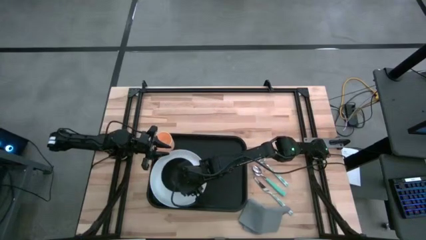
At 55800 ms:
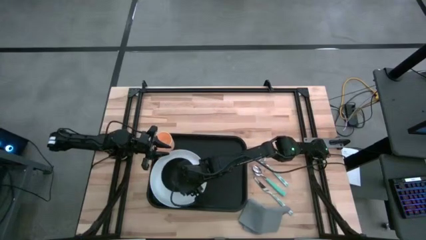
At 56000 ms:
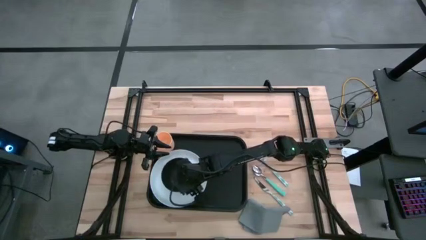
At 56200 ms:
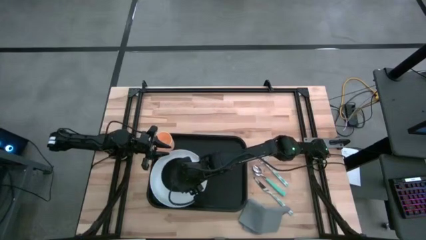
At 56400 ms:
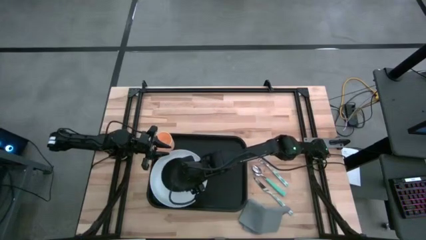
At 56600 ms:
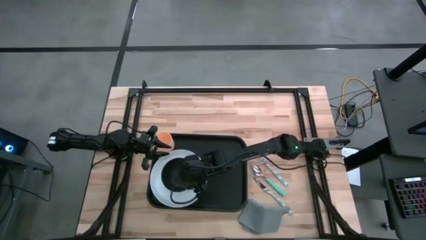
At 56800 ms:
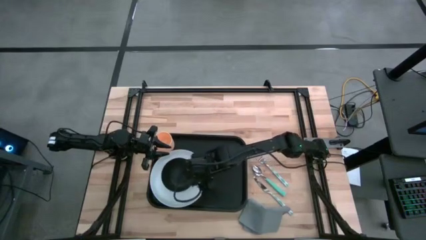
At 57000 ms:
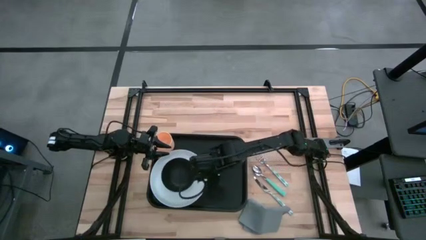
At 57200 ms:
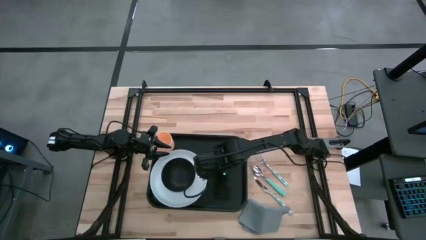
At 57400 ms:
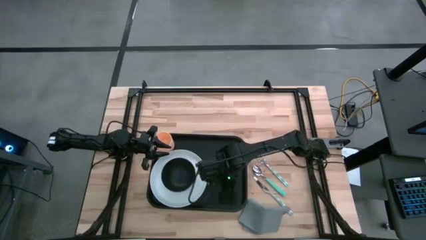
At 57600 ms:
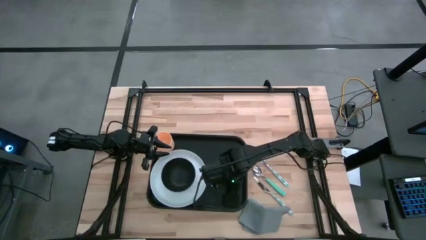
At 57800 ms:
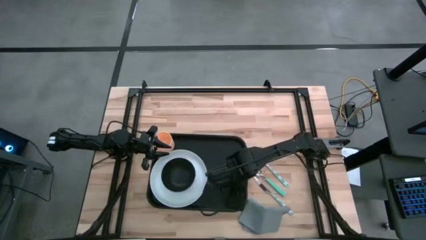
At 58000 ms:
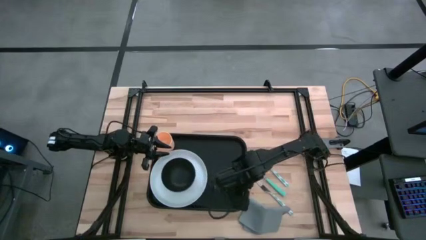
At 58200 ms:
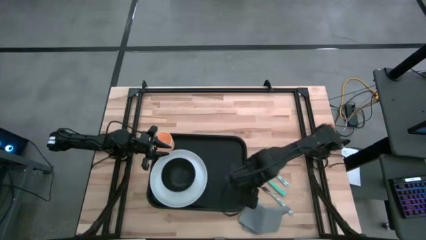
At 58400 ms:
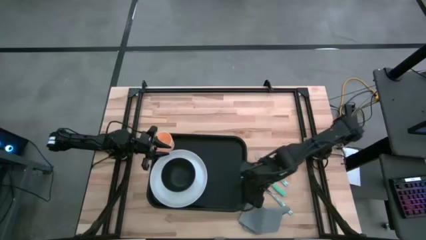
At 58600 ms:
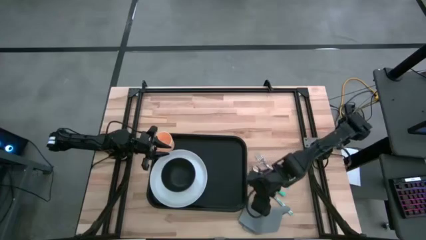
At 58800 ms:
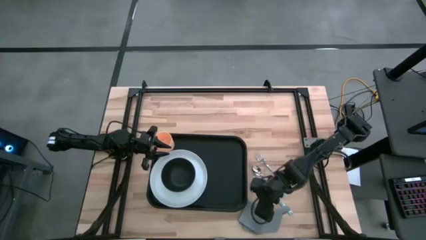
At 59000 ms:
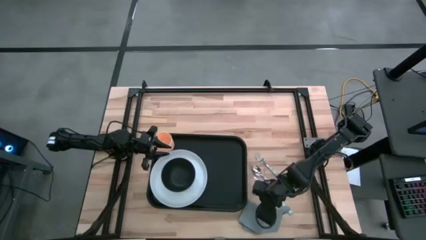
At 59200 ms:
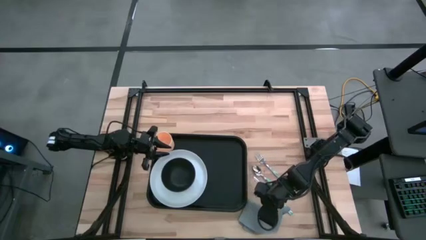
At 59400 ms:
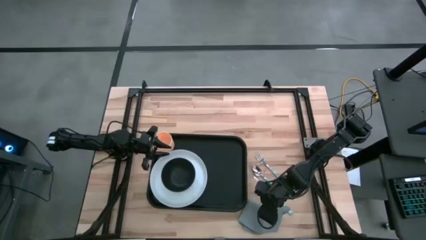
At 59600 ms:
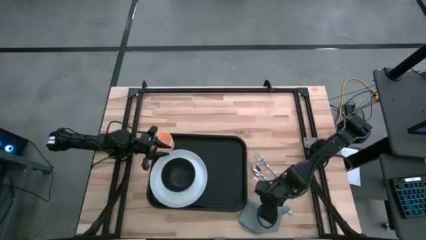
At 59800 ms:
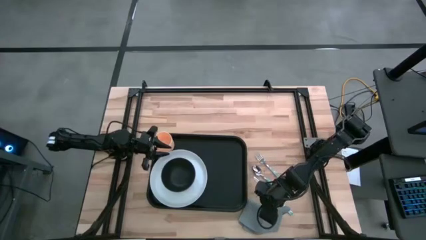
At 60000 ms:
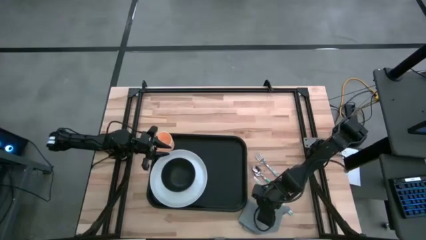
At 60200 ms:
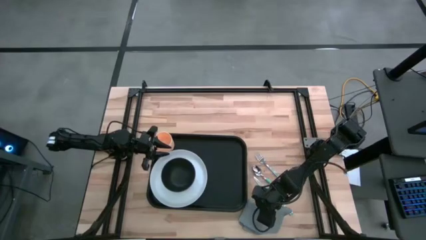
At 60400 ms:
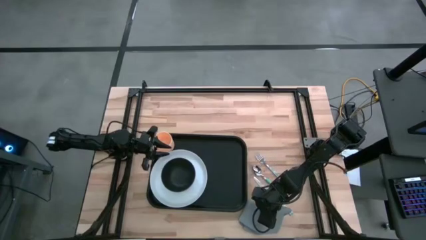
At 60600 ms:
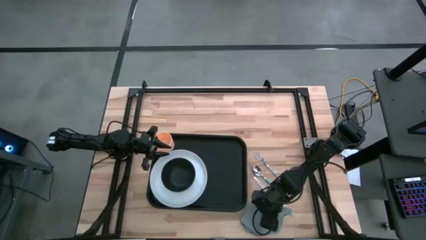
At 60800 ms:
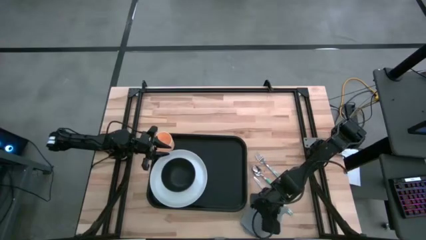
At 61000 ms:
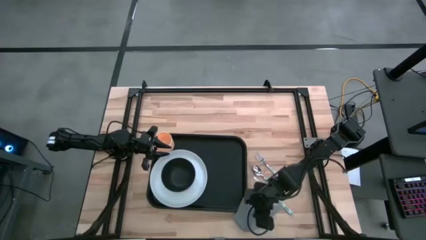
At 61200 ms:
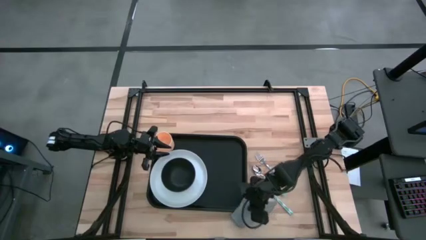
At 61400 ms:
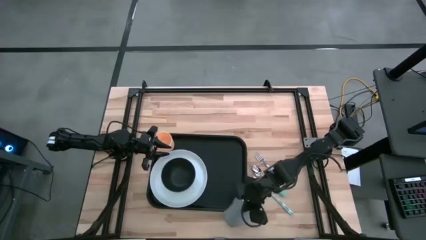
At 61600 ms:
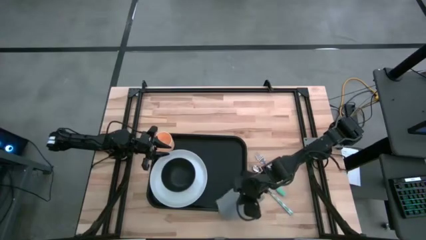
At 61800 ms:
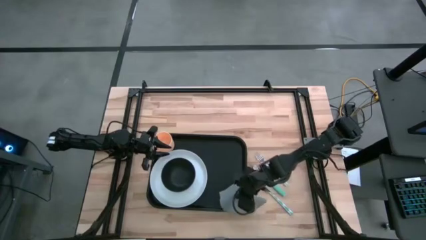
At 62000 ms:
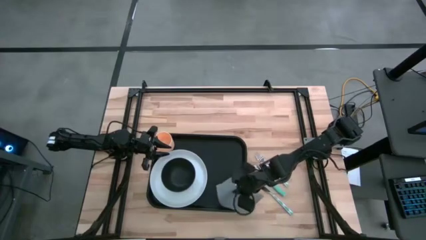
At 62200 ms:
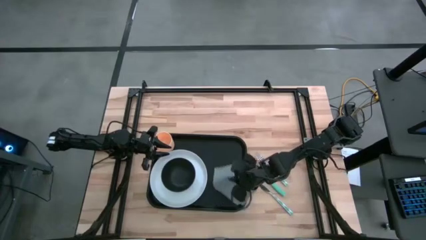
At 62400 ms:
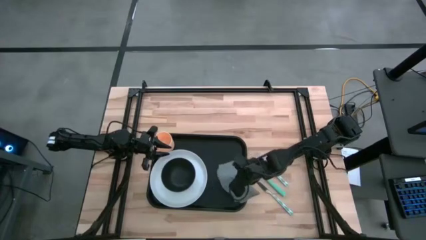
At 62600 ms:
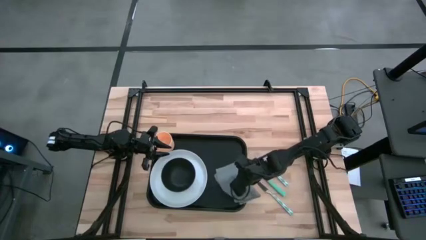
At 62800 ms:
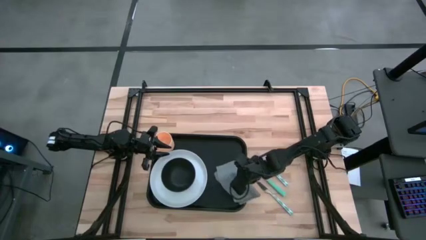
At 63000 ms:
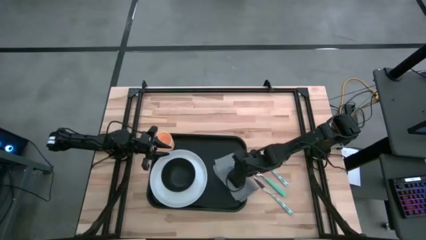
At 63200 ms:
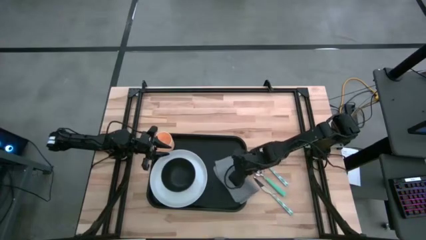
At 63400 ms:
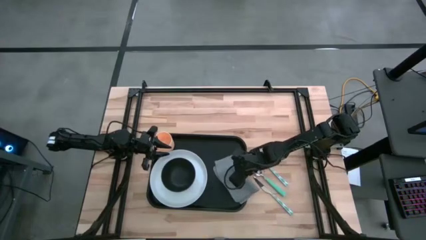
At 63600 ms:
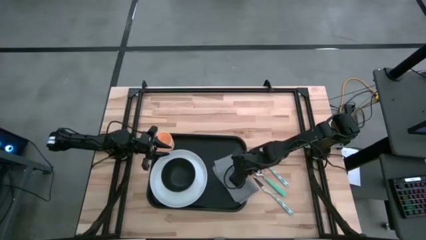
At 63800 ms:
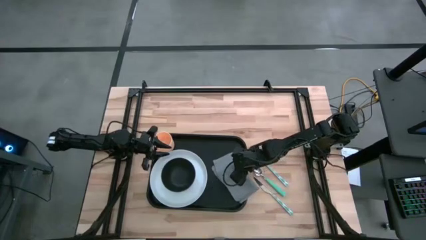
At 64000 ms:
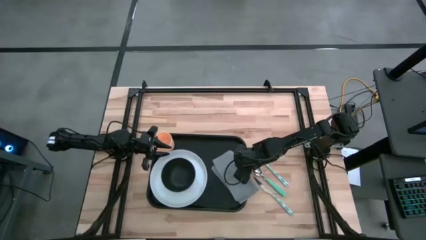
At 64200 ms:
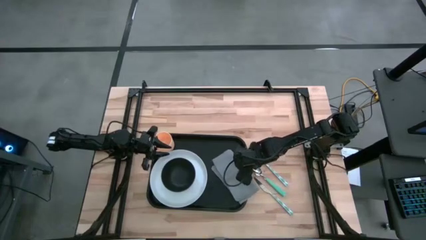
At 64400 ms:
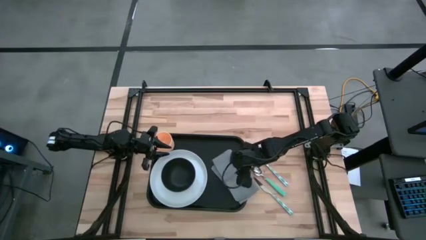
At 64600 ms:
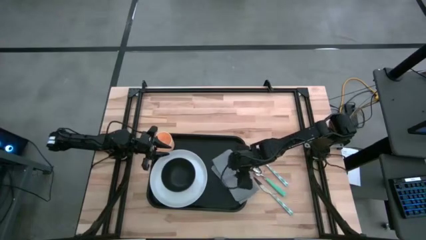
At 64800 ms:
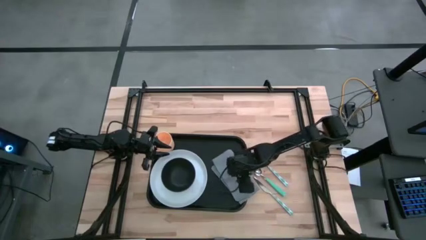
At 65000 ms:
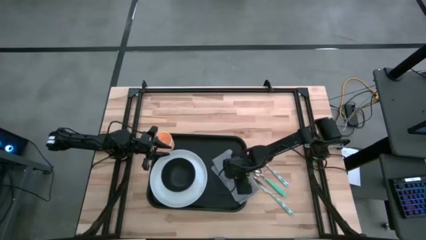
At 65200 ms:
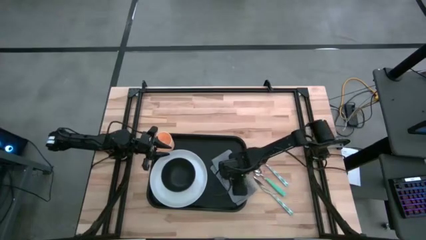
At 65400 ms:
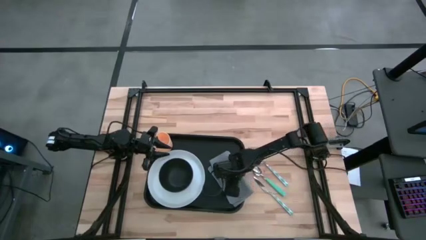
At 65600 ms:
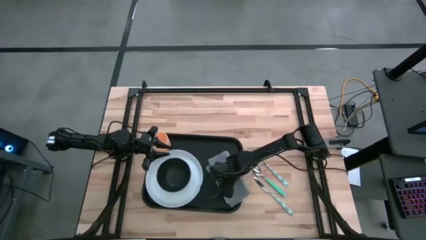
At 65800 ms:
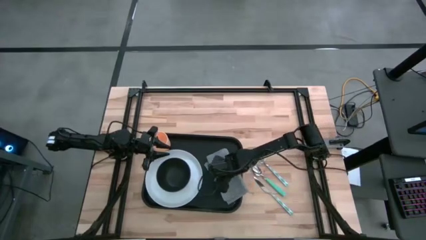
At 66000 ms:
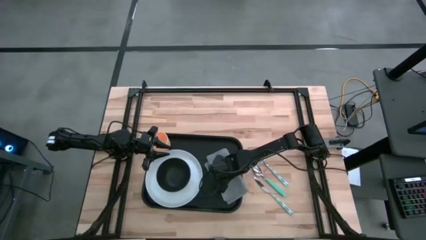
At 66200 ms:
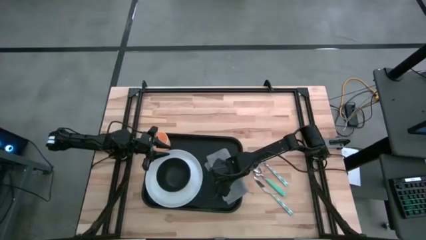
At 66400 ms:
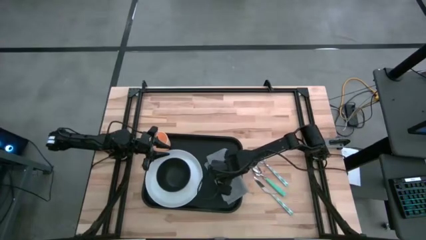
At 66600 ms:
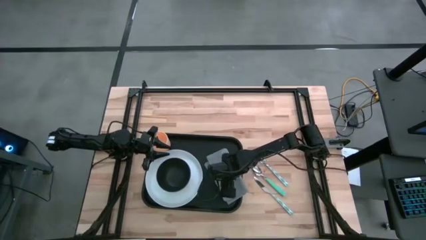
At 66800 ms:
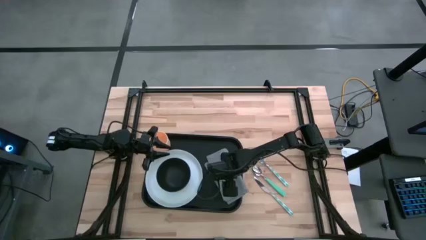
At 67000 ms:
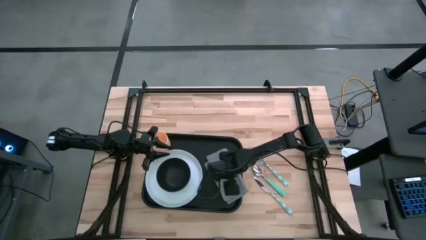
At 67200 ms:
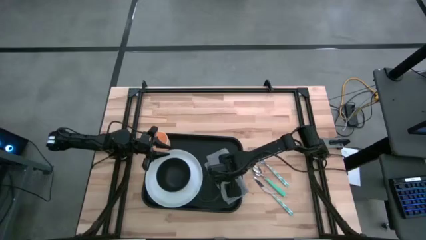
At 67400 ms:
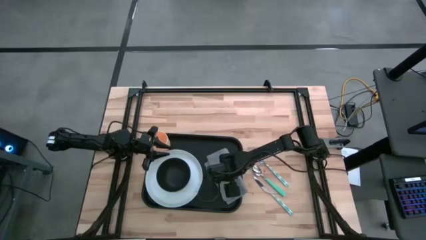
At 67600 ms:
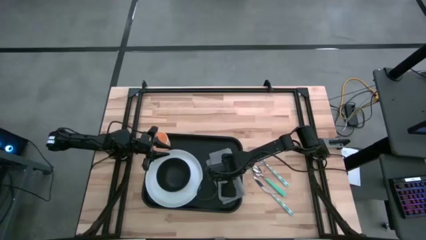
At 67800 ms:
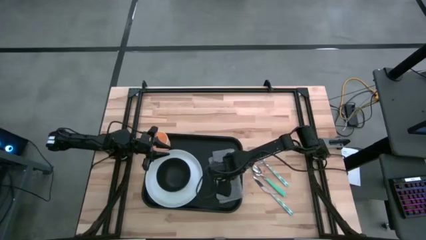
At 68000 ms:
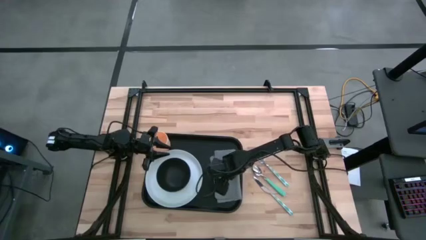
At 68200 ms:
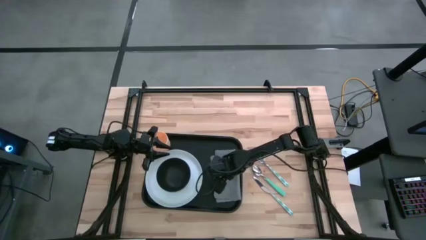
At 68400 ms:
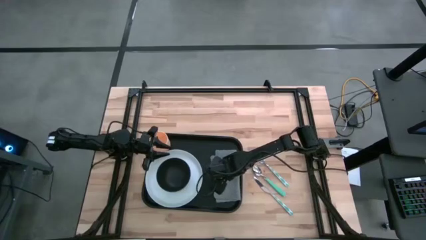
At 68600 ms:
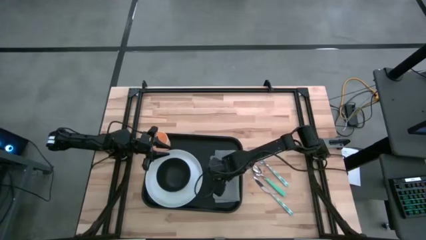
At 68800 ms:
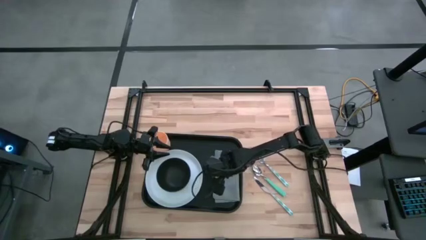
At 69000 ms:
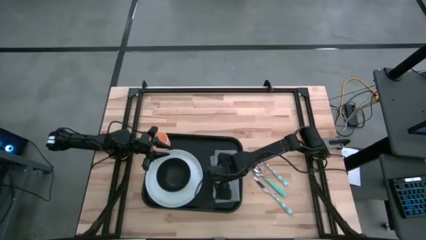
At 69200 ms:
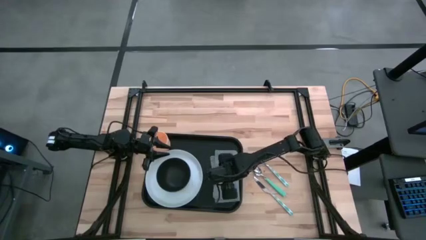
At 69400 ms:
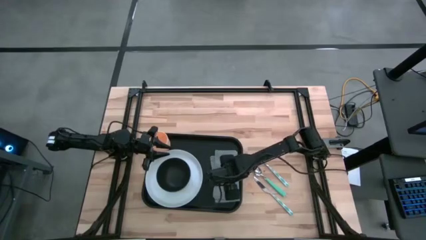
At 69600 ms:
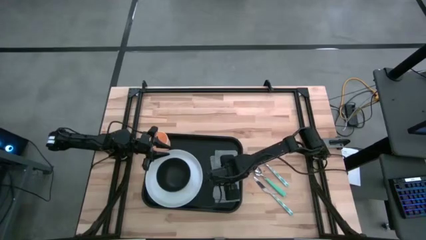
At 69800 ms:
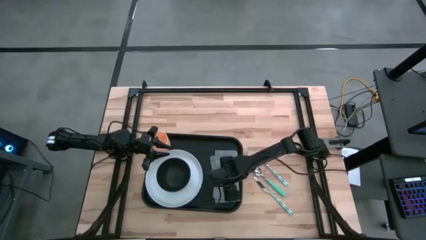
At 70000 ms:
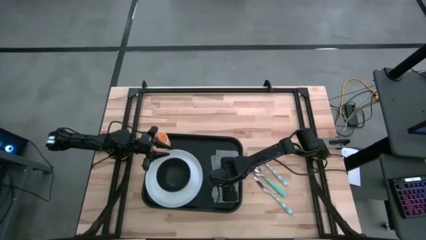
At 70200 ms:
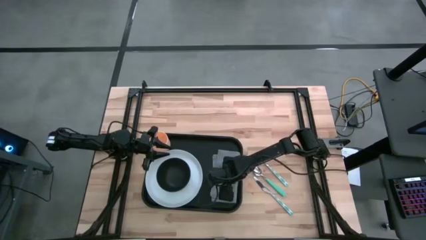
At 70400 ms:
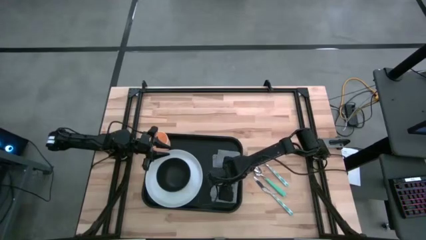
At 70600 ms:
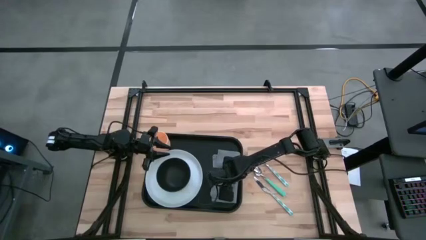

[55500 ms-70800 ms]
Task: Set up tray
Put the gray napkin on the black serving tray

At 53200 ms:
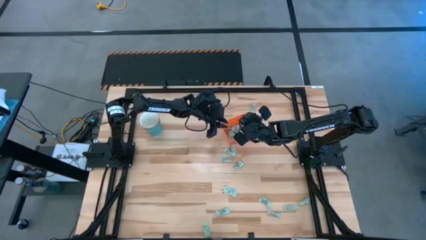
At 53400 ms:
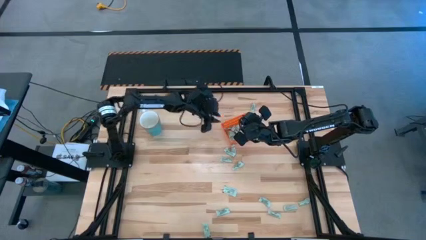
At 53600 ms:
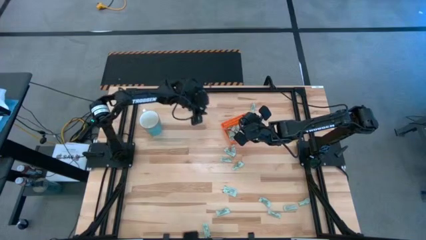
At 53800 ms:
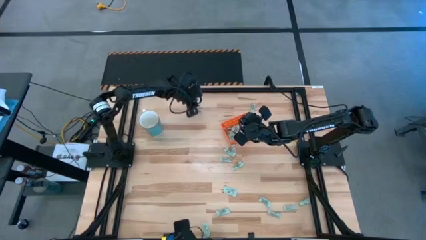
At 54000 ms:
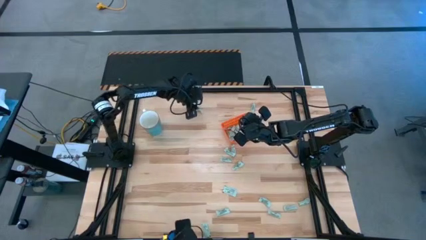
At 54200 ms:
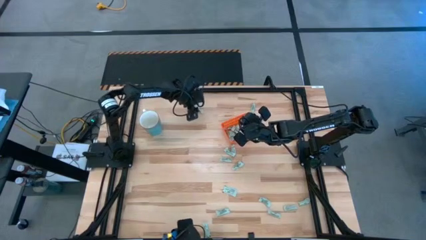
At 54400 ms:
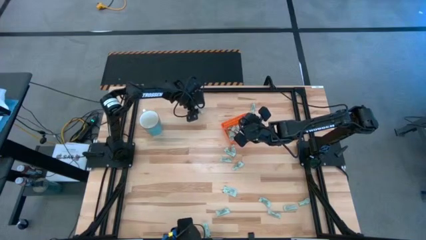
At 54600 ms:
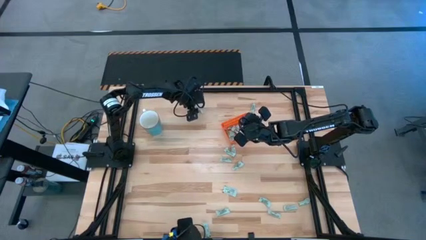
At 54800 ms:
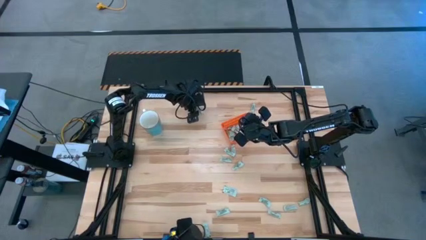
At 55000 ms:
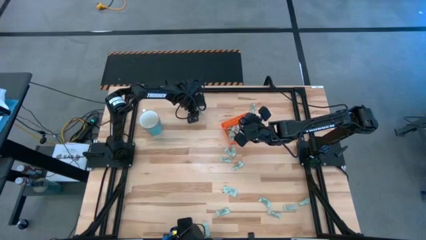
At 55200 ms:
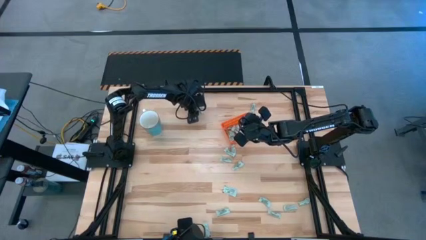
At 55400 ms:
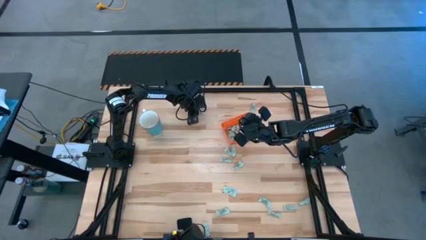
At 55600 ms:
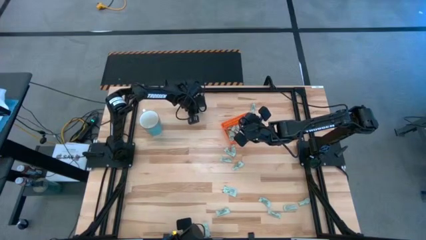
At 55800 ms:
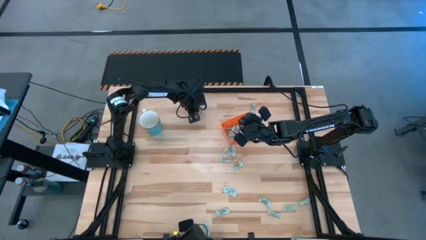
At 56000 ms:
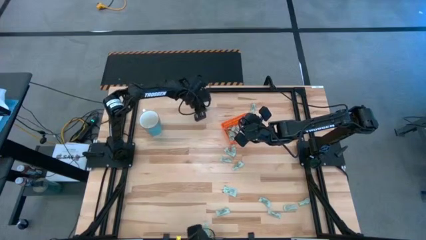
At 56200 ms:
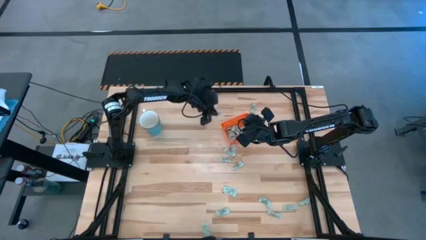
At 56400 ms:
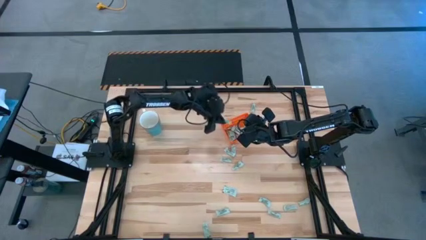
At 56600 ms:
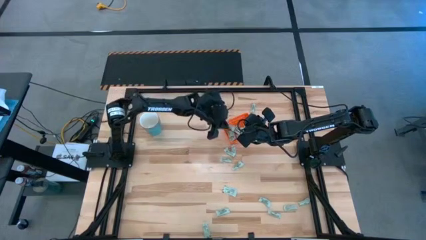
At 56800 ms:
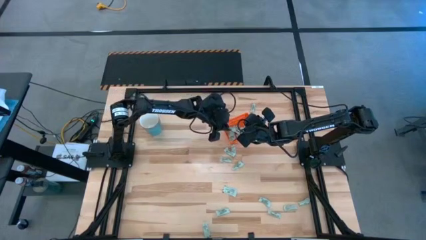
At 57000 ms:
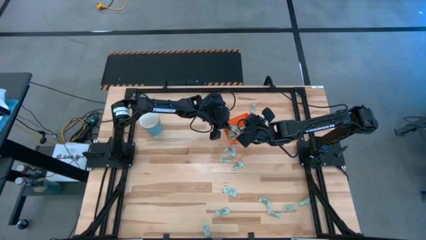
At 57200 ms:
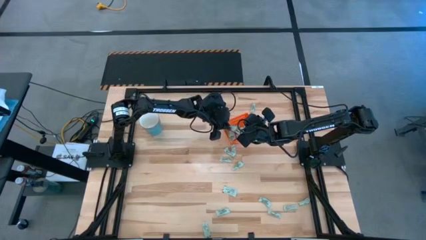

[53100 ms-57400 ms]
Task: Pick and place Stevia / Truvia into bins
Put the stevia packet into the bin
